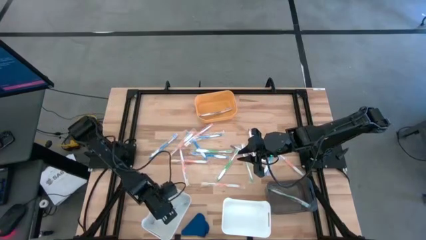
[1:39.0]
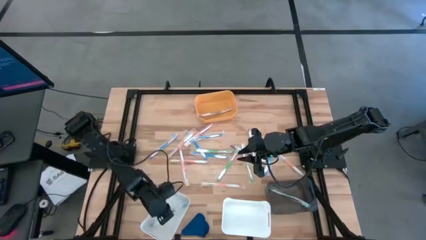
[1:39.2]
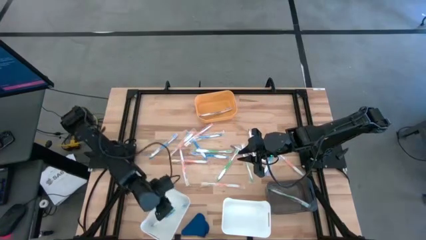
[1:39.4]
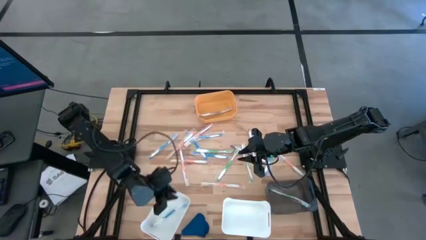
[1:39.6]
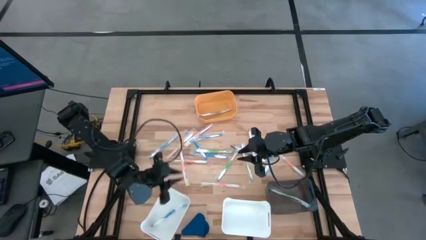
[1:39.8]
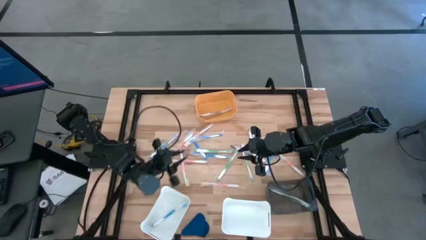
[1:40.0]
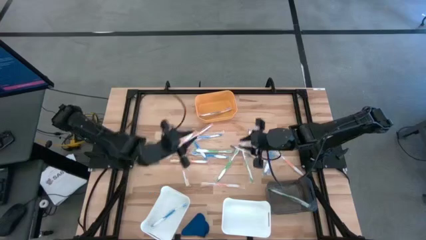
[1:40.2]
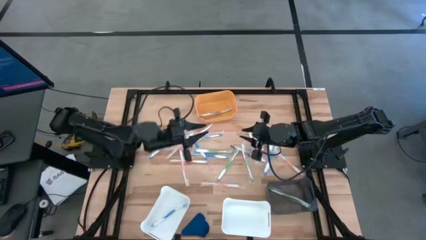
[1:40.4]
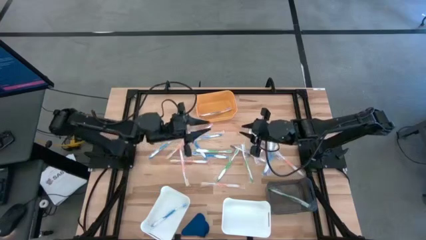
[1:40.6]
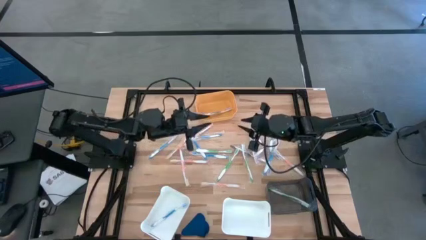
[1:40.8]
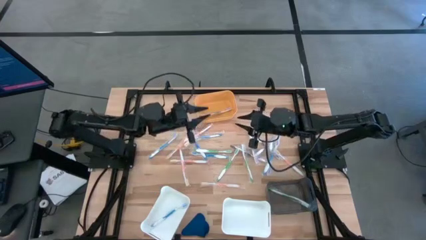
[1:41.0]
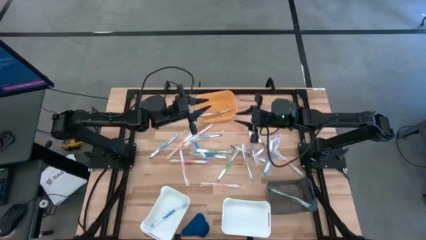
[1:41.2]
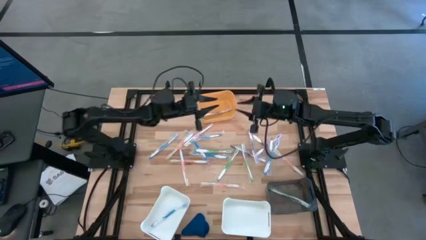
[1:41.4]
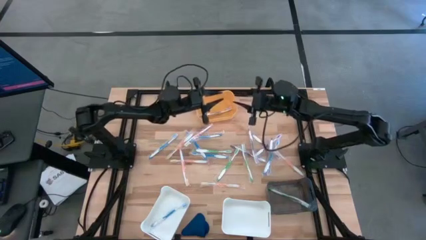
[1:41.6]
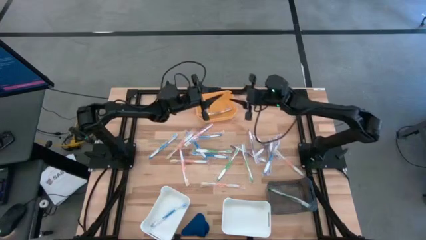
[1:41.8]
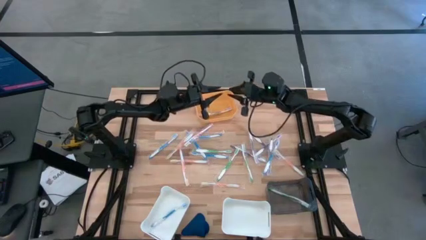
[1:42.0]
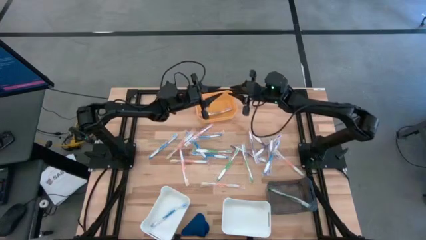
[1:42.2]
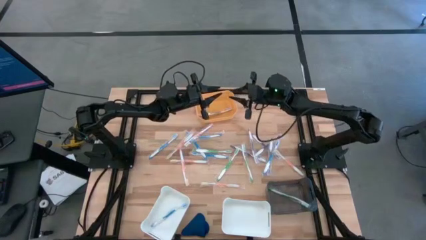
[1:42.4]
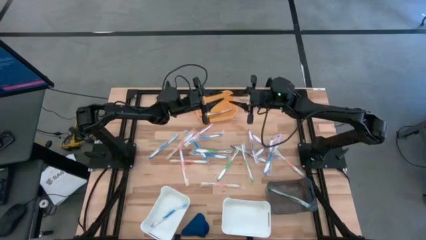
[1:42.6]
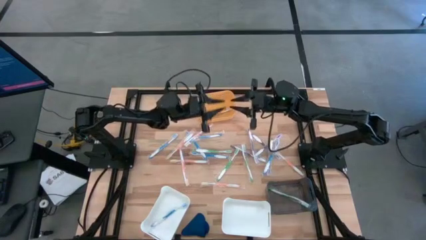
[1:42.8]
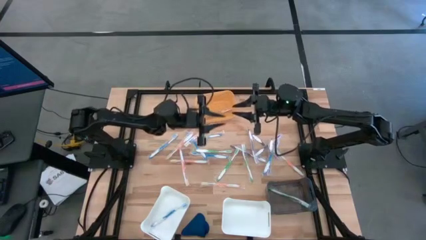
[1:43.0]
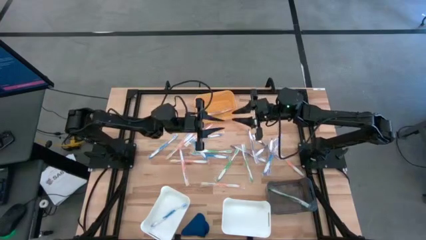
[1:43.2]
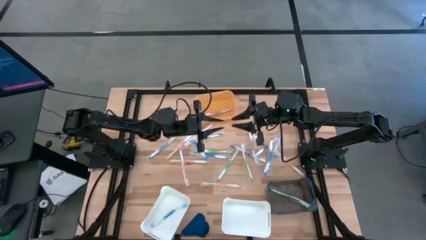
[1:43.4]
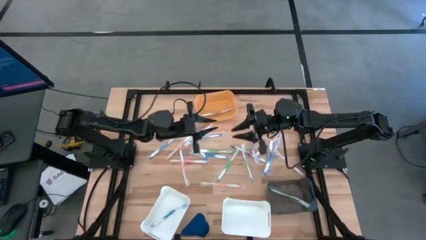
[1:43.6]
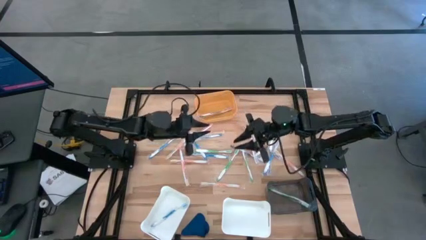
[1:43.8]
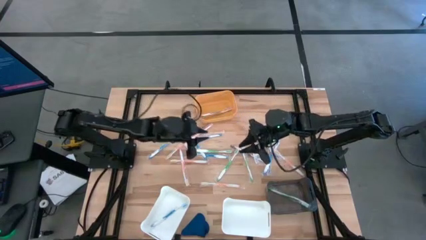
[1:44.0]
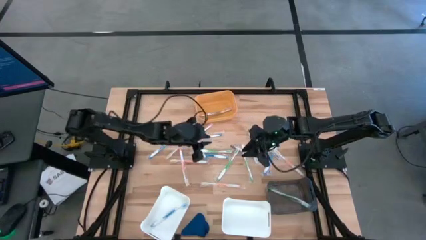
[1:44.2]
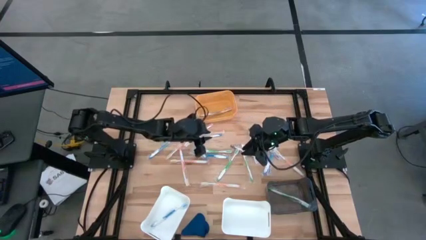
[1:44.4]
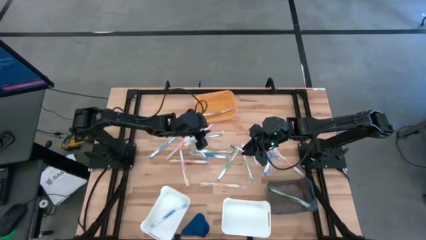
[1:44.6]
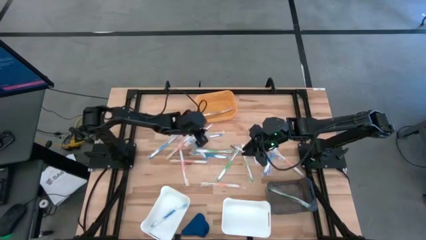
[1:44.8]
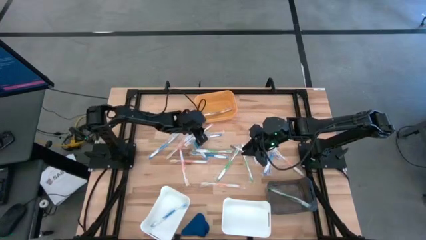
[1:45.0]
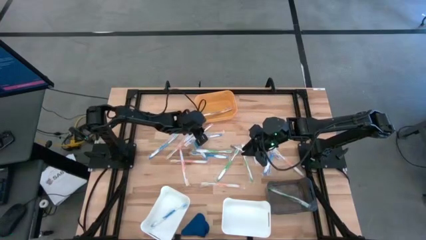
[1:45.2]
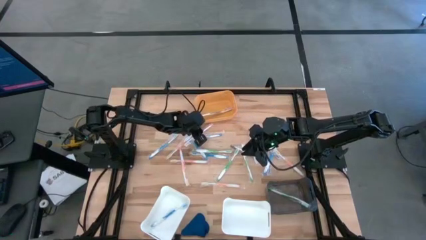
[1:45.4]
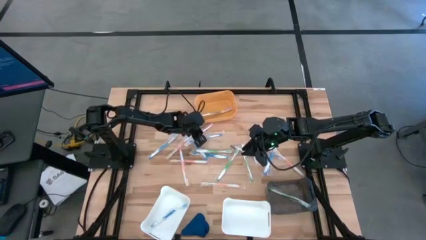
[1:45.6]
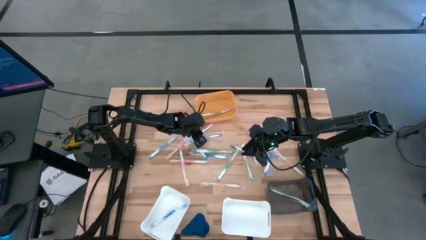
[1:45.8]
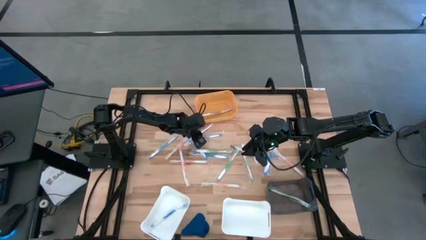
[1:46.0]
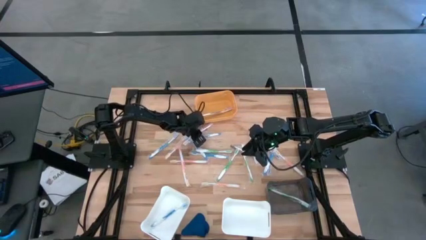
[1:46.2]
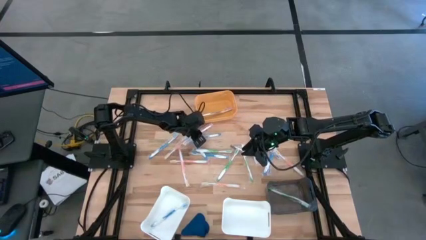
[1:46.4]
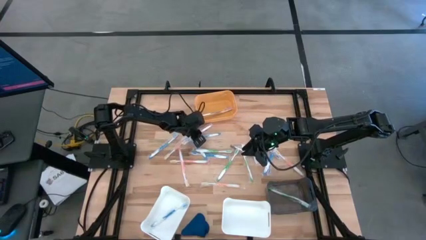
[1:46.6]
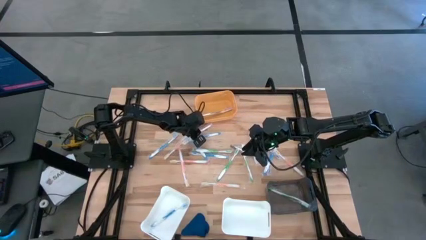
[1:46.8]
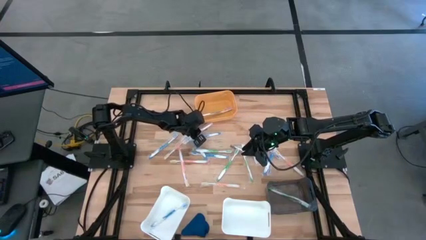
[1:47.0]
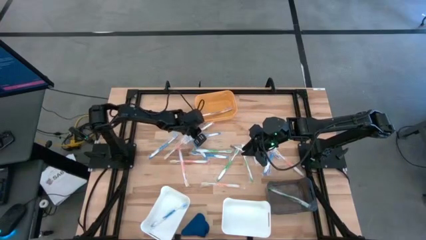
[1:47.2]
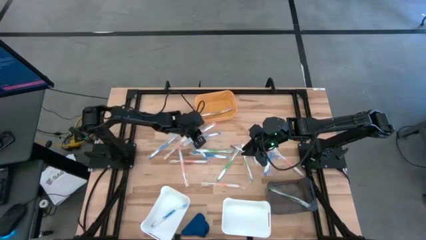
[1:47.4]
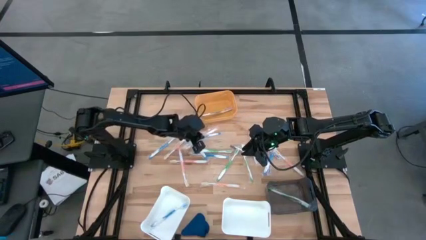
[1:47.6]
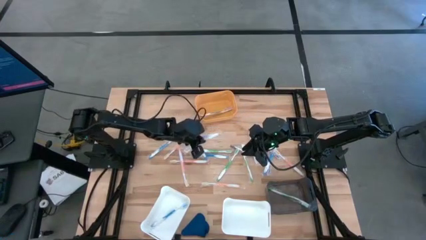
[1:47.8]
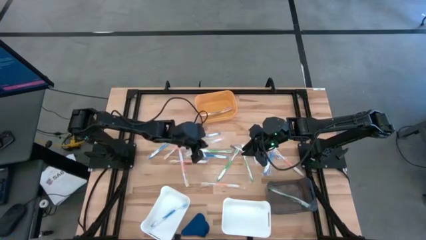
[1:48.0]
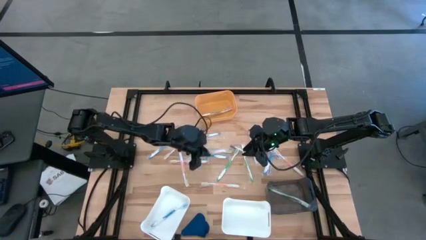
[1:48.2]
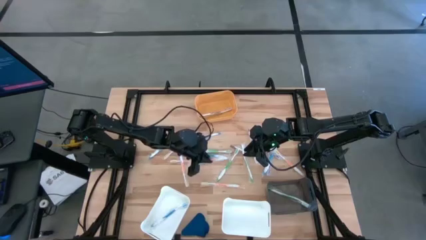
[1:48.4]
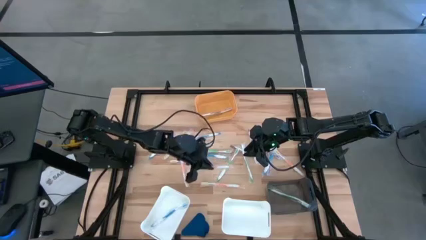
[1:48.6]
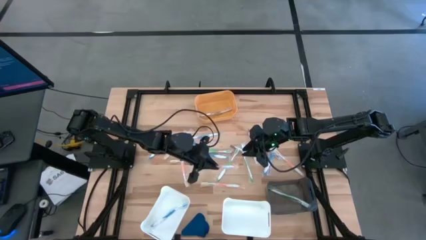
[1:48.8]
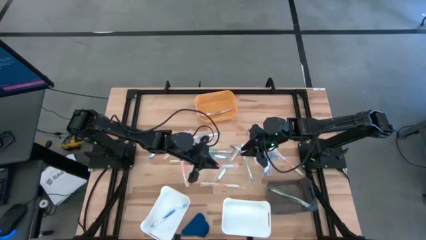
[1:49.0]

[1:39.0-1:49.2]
Task: Pick & Place Toothbrushes
Put the orange toothbrush into right white bin

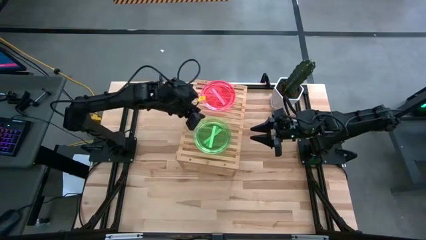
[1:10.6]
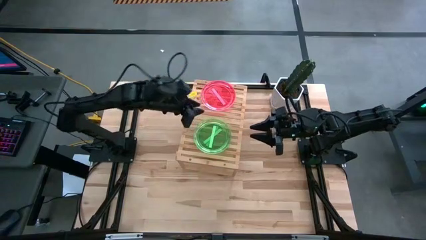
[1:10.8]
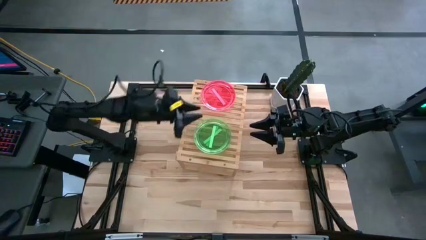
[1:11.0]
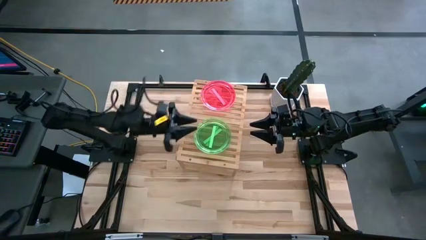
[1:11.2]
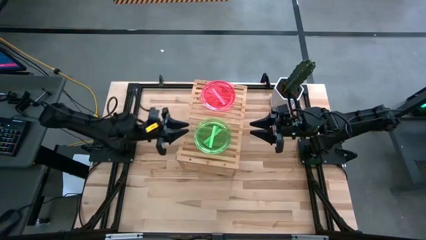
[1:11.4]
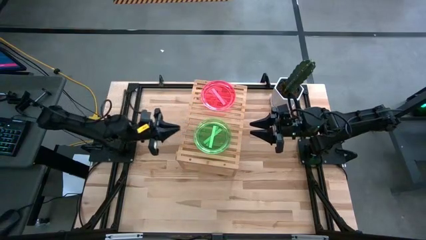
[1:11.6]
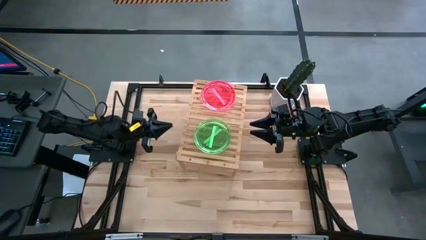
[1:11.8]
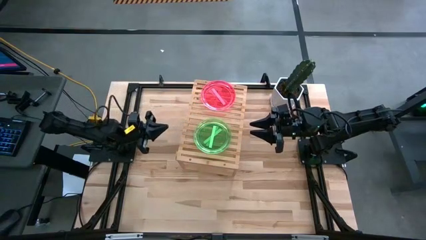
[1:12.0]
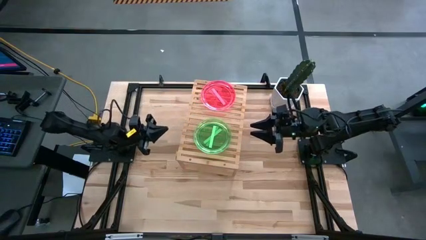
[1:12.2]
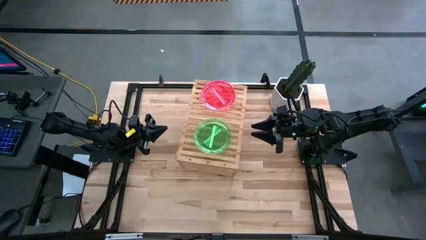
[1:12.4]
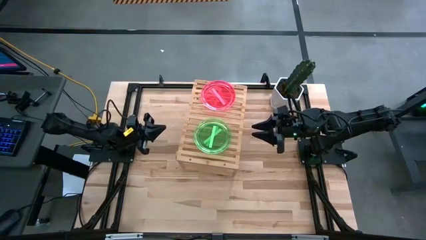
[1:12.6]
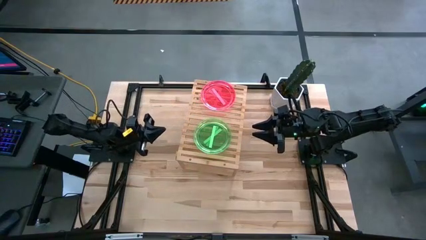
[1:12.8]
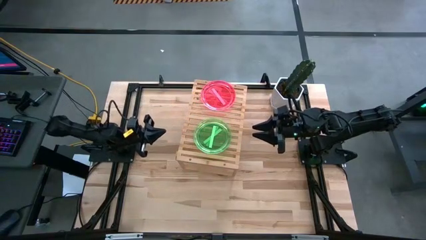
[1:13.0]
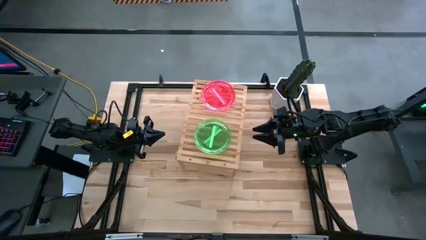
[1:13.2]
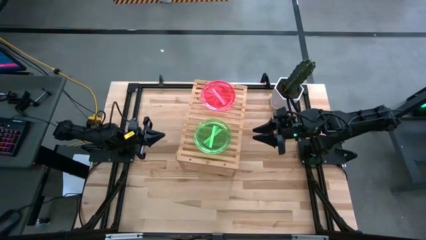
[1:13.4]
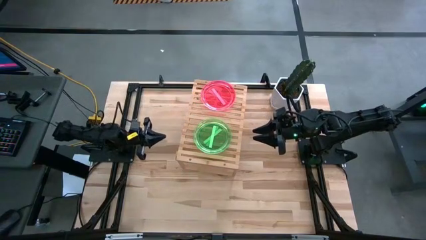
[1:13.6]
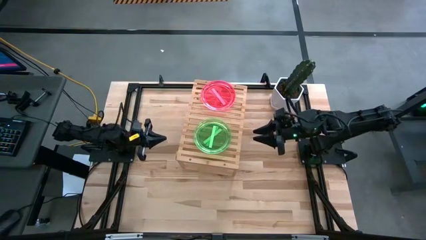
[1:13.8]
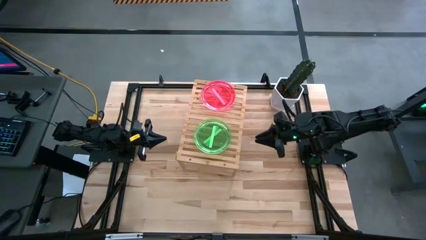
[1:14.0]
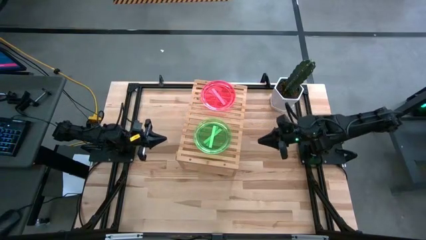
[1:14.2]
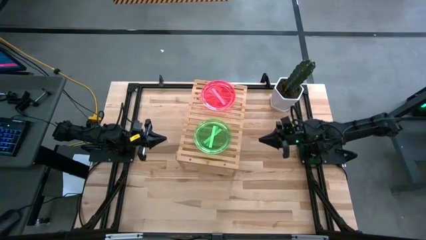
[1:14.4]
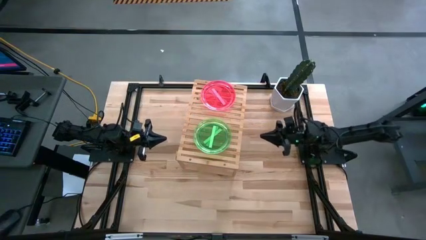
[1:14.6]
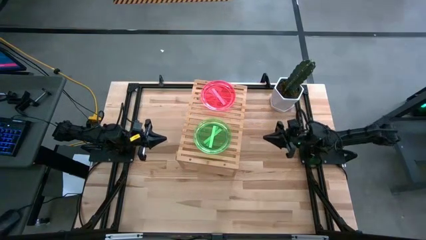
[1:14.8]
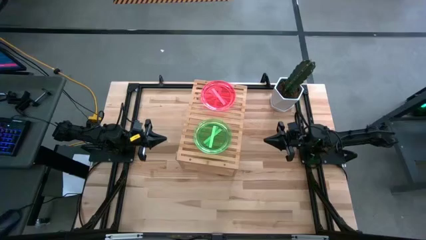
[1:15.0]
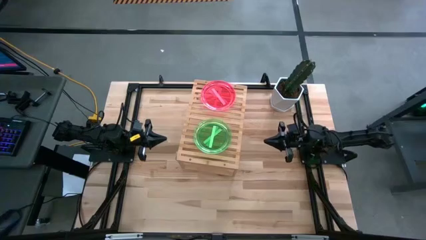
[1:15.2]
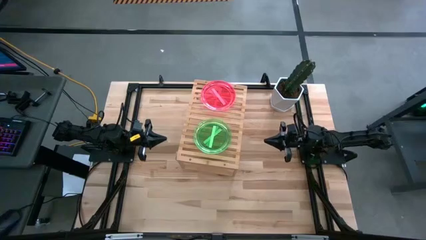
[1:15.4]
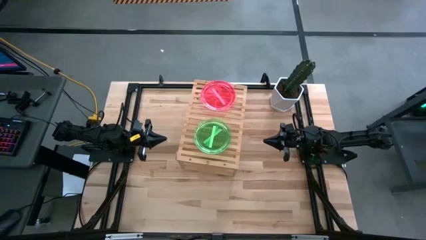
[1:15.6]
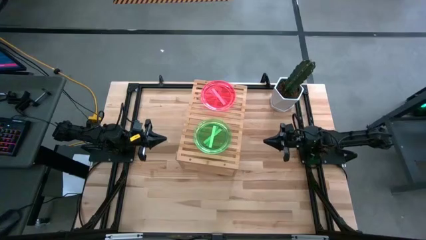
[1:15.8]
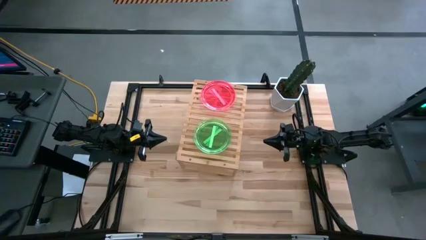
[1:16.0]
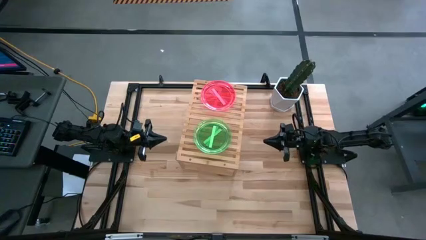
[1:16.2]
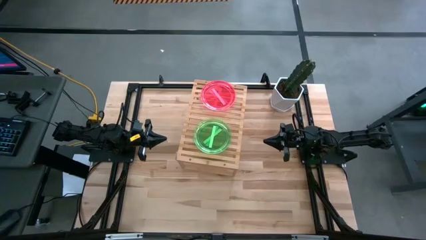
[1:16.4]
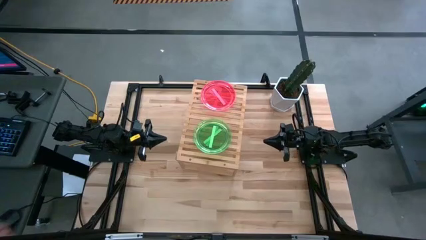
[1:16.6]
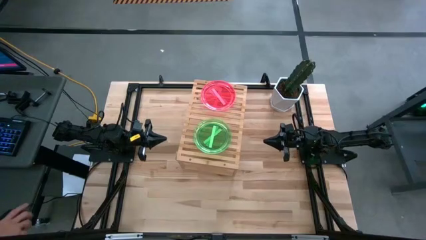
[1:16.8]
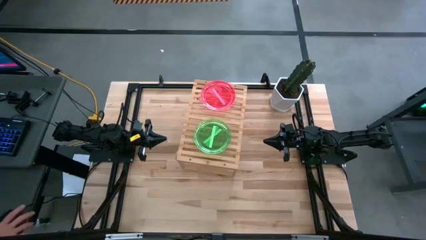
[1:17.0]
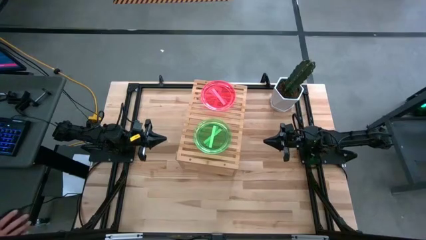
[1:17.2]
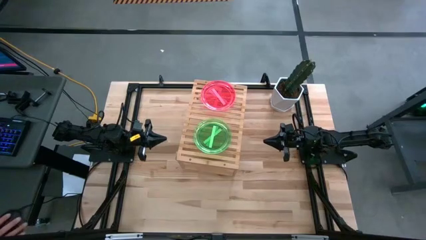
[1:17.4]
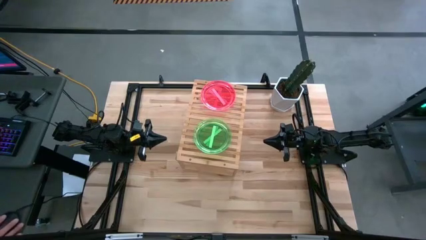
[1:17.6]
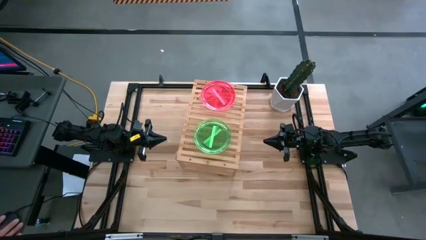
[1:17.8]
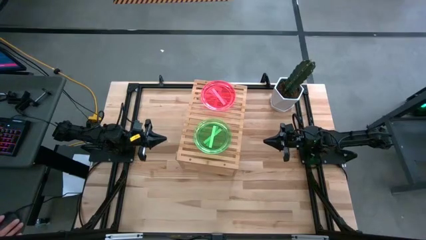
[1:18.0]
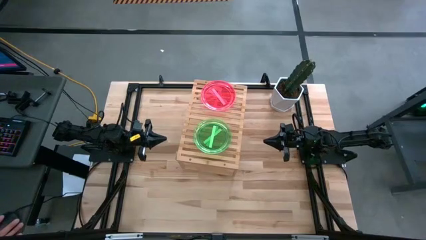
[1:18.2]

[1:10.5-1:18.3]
Task: Place and stack plates onto a shelf
Return to Home Position
